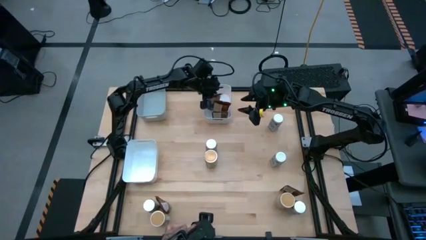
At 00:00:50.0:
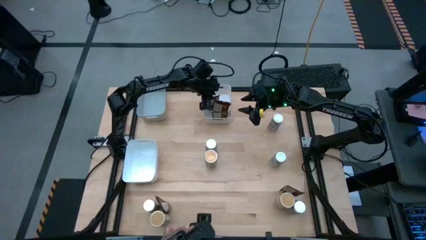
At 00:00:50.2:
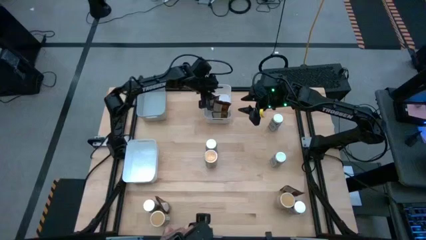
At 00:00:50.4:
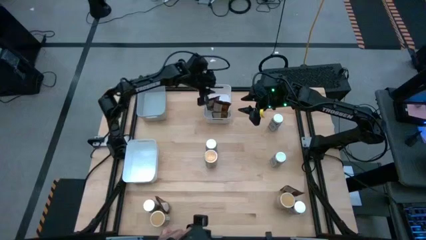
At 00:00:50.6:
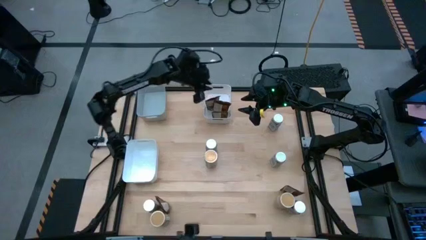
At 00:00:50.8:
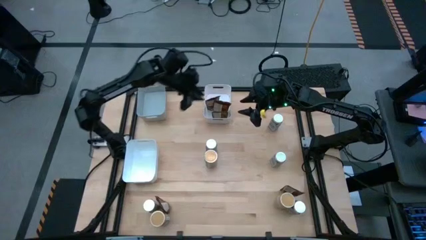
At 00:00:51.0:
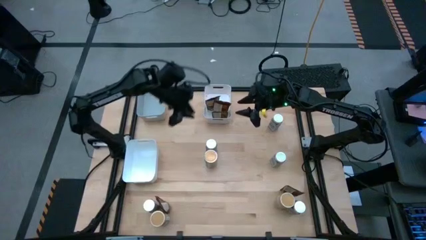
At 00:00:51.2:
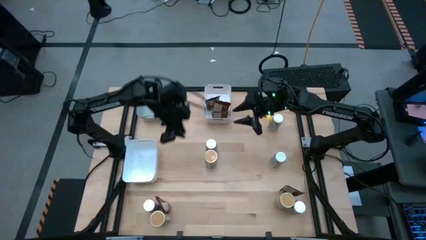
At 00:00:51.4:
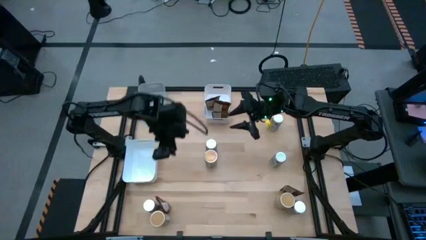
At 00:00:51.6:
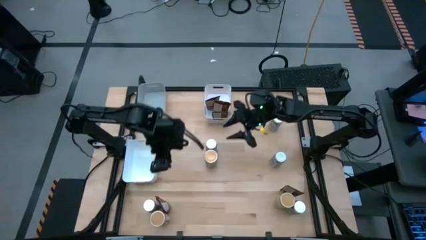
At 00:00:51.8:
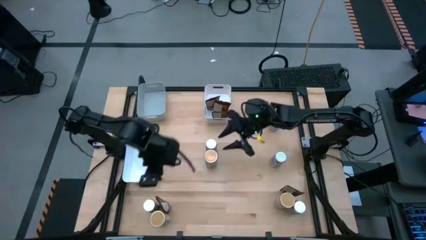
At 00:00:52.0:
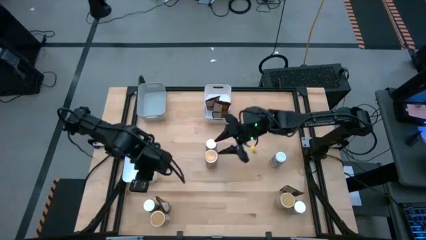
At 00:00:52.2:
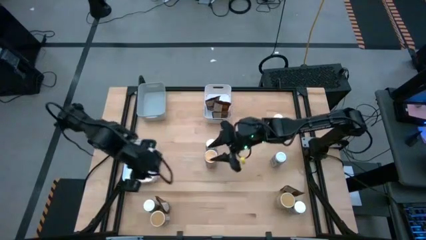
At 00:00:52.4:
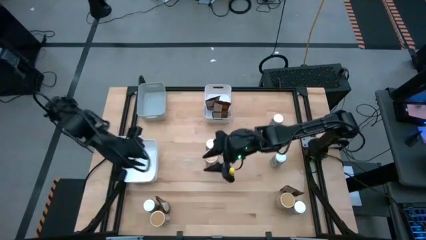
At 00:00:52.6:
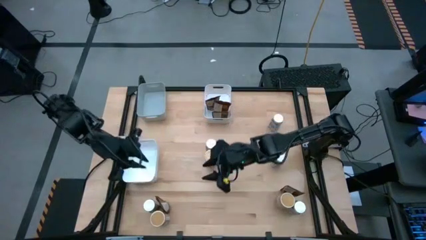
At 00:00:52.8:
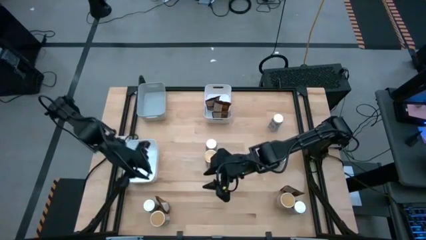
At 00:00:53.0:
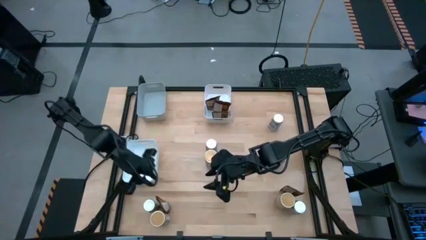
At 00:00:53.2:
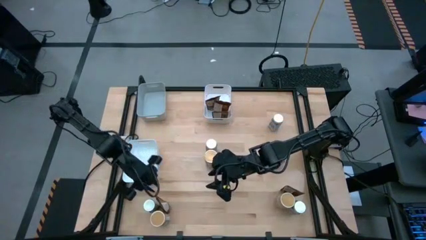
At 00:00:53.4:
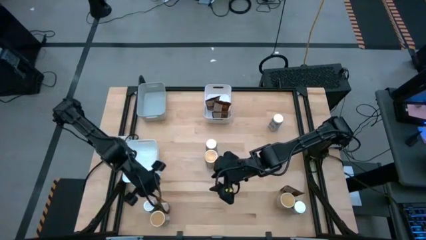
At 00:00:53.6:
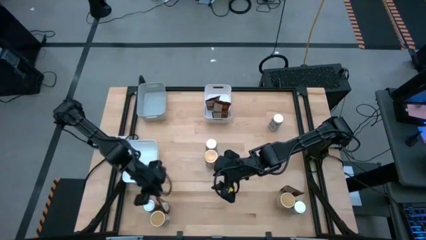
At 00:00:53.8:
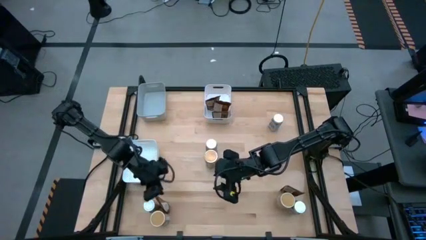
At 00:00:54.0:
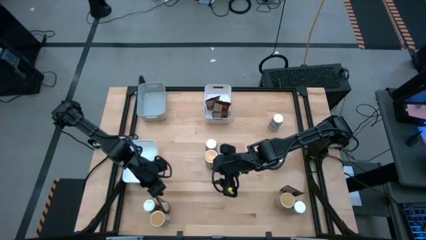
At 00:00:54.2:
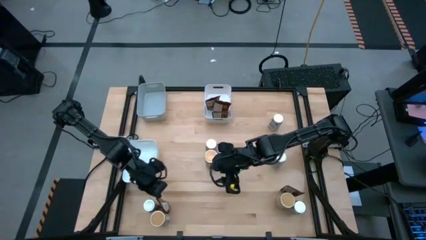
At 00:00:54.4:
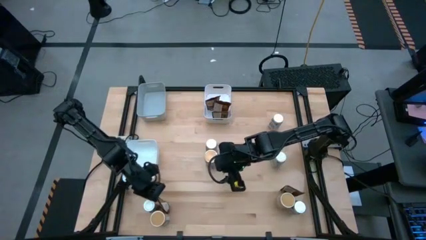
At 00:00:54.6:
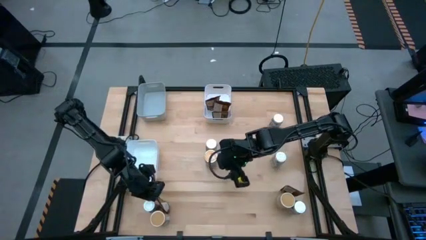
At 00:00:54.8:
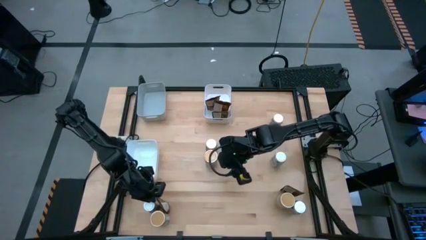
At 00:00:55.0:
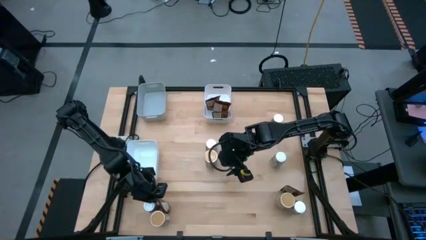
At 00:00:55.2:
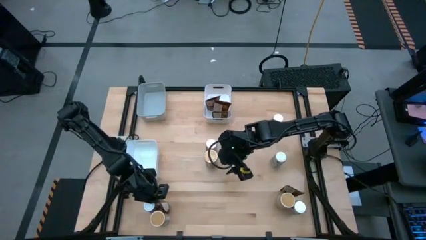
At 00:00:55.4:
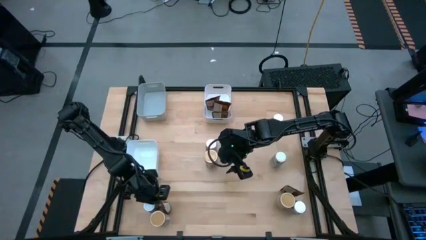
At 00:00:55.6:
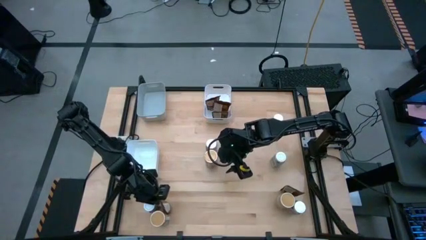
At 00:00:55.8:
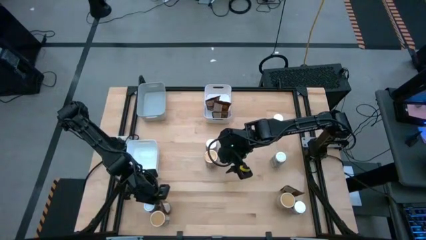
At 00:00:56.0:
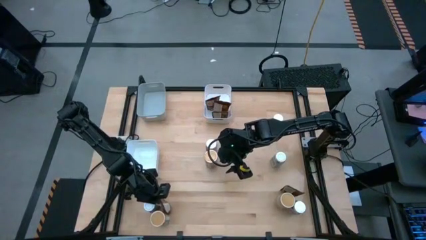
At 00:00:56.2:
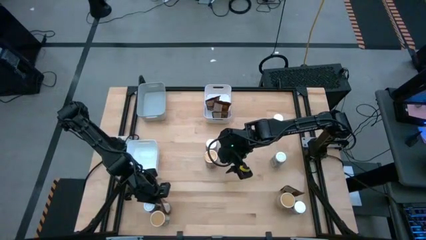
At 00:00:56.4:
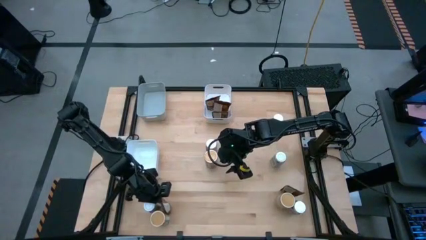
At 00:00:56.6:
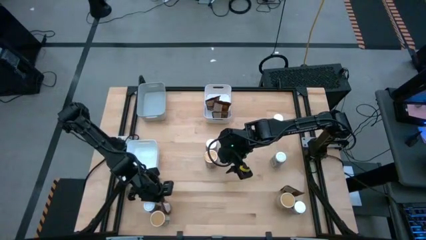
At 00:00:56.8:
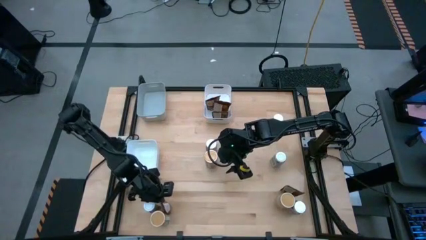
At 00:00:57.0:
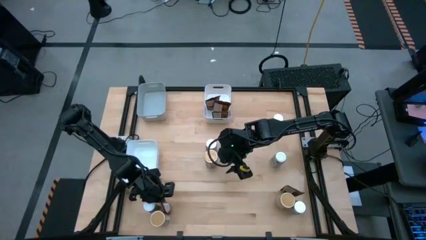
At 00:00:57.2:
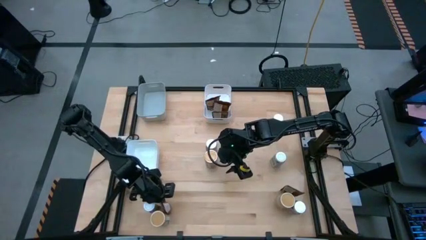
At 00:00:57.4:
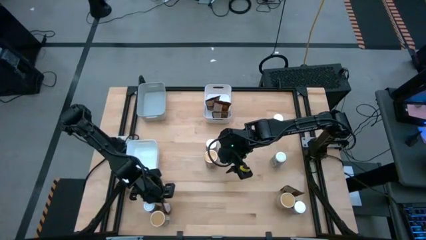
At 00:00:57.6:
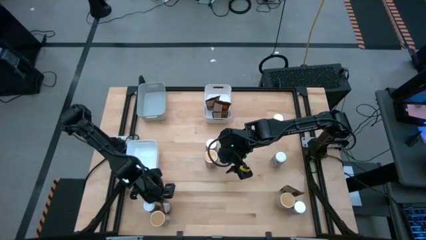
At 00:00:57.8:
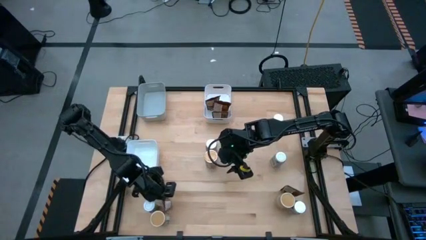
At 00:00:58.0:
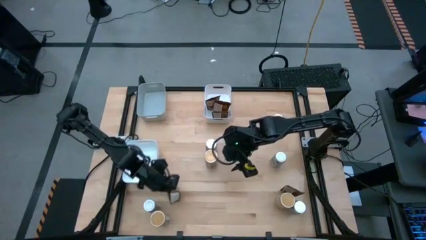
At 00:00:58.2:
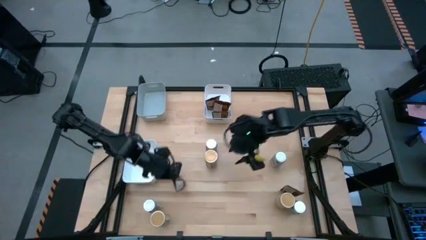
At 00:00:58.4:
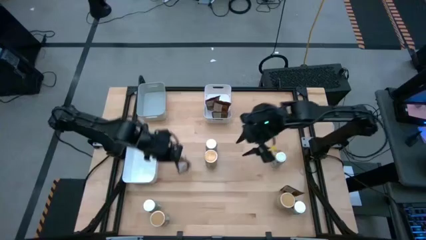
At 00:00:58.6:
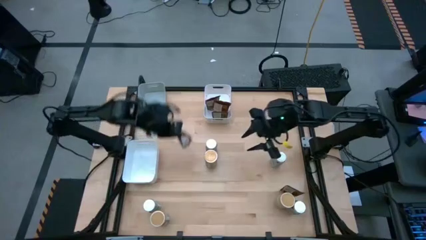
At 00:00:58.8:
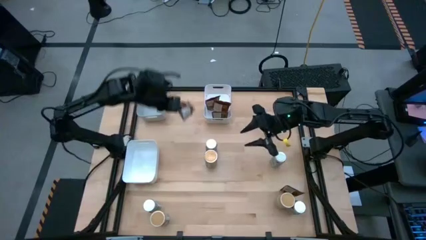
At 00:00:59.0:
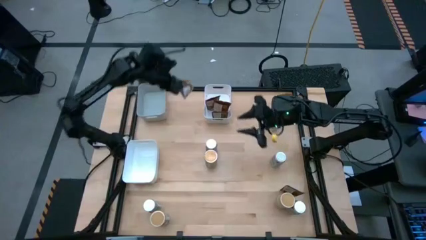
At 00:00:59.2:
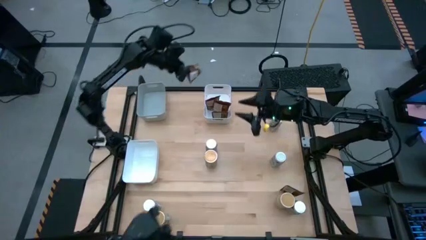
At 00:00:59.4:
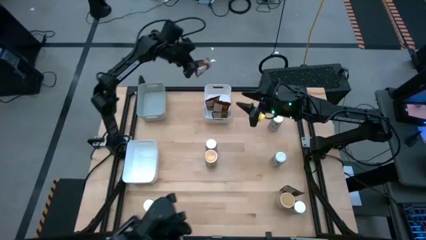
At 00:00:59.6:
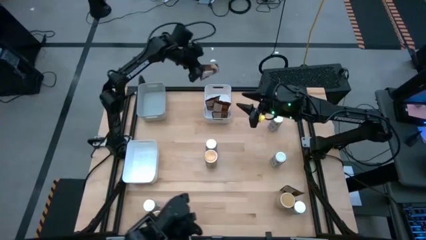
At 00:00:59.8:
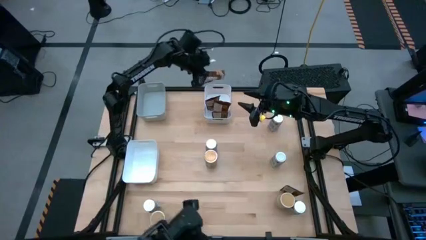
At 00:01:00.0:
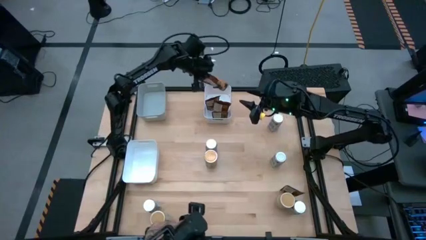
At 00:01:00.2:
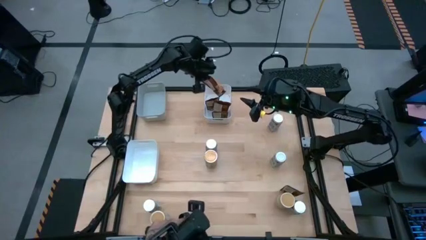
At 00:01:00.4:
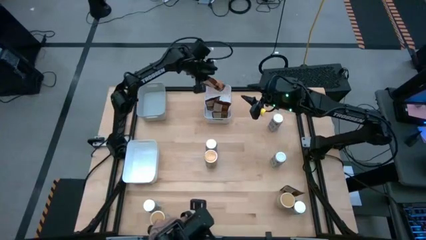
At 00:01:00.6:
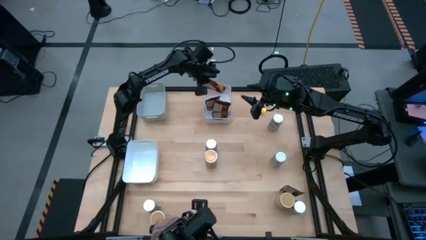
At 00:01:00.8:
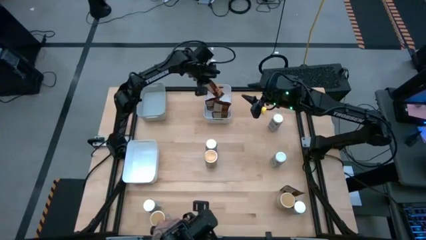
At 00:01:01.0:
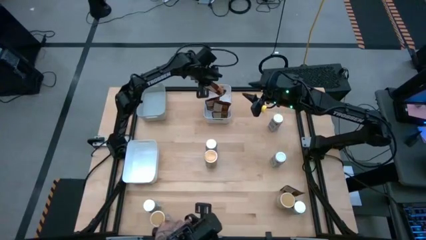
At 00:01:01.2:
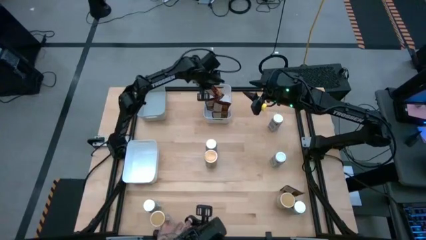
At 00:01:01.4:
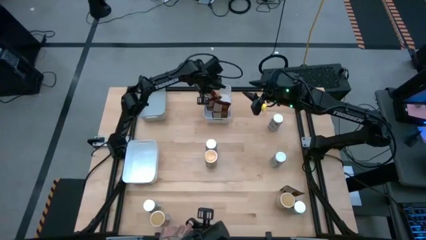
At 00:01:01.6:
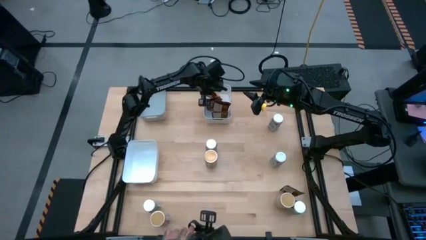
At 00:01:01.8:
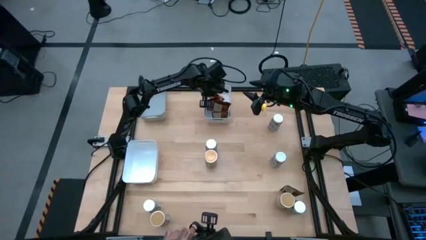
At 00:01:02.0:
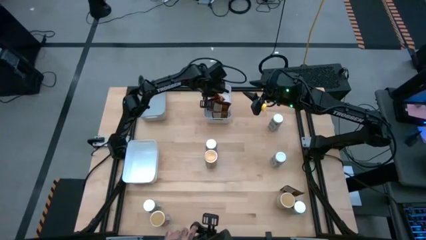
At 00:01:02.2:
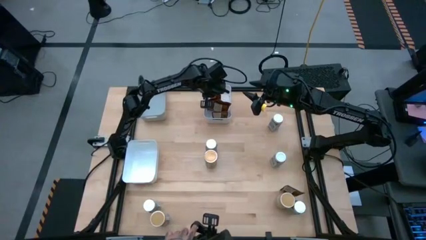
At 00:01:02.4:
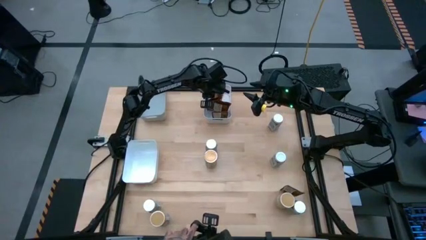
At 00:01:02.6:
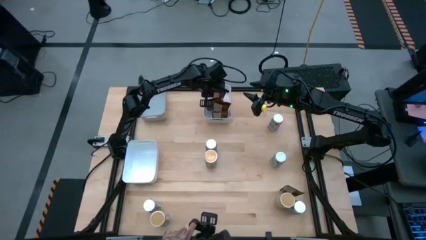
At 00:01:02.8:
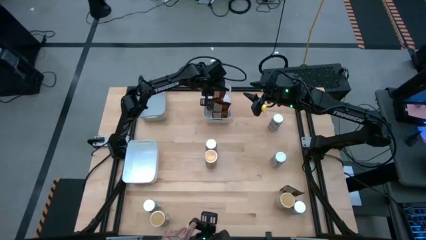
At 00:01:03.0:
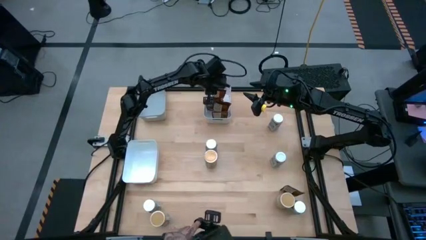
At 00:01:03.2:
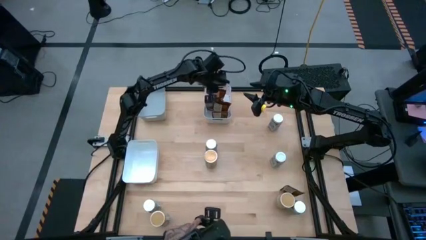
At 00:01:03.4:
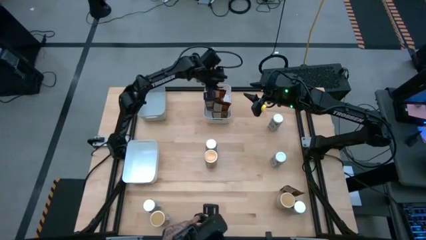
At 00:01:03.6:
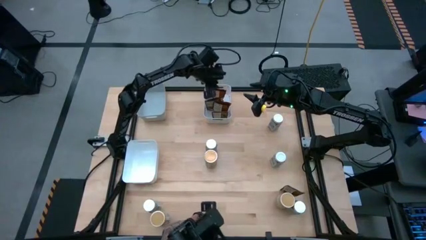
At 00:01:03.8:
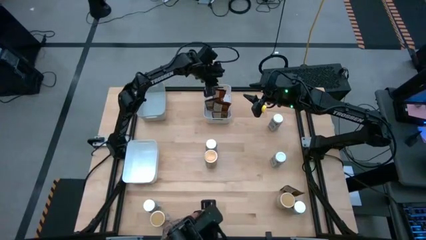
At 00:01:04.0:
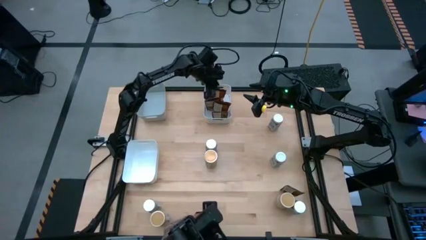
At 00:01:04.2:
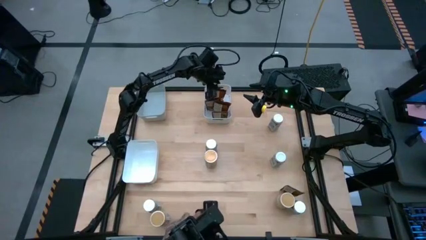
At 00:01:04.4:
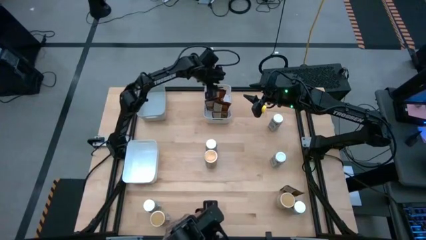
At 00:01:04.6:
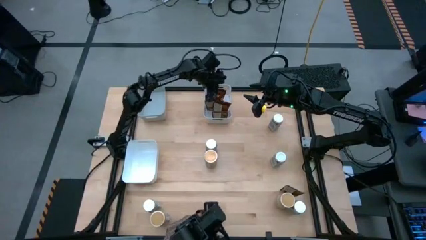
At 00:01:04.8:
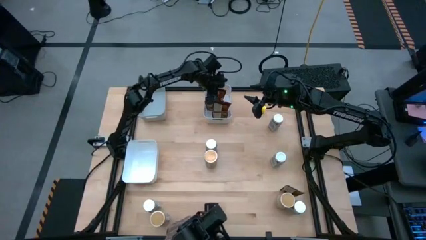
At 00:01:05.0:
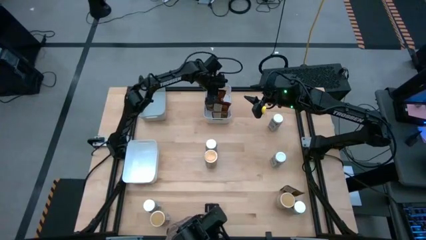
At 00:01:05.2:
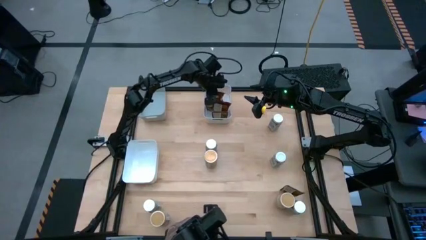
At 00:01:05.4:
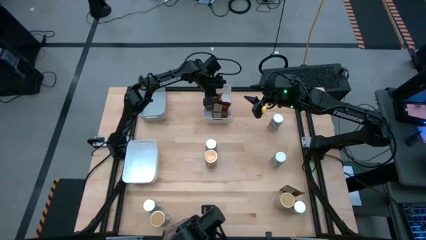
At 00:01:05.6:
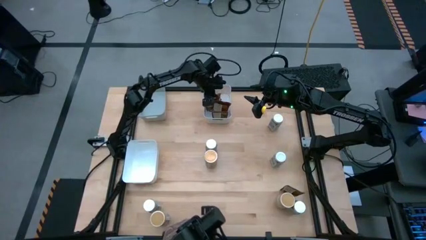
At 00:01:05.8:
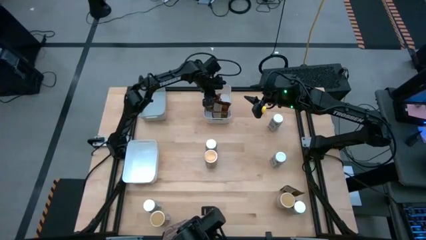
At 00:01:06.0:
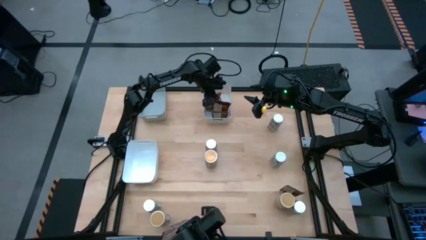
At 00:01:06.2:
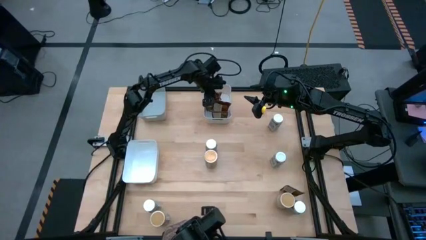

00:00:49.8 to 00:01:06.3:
Task: Sort spices by type
Put the brown seasoning pack into the top white bin
